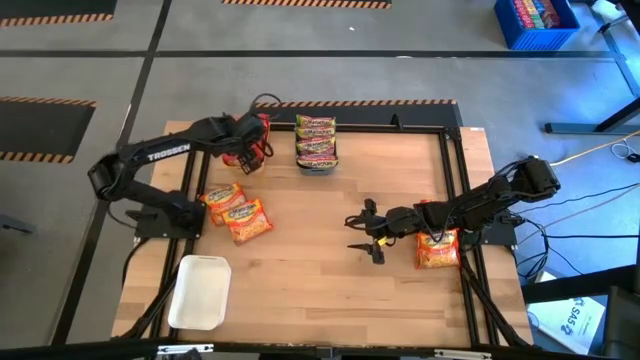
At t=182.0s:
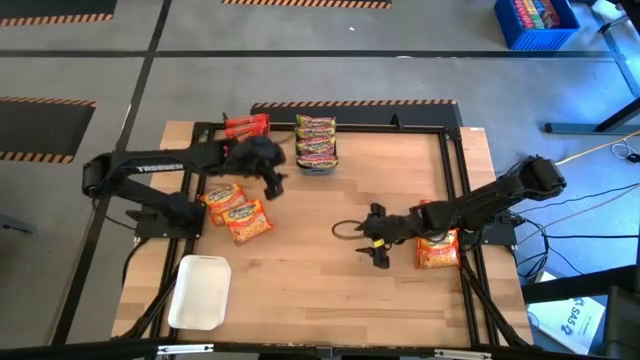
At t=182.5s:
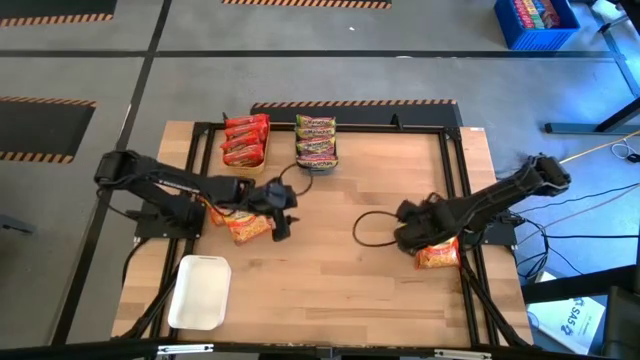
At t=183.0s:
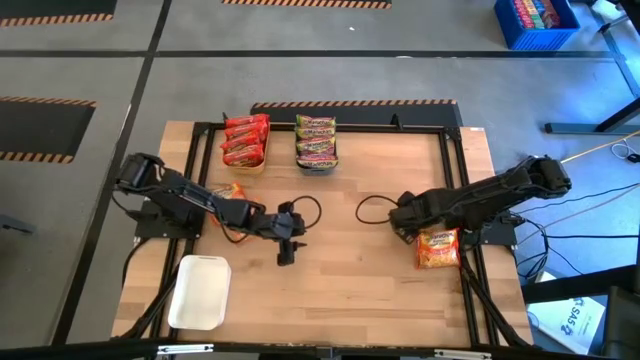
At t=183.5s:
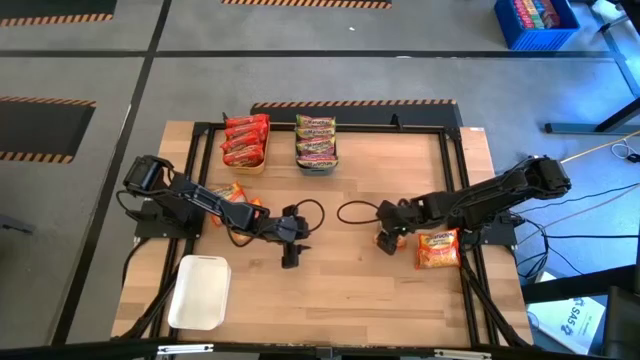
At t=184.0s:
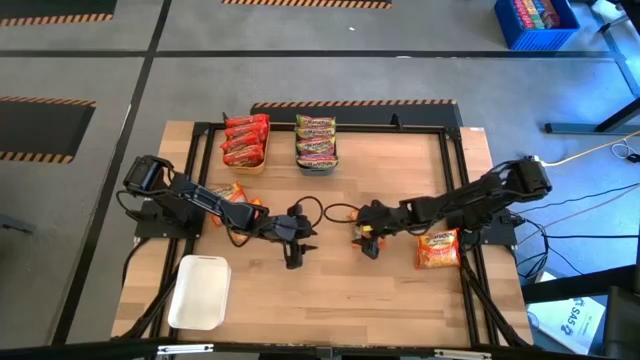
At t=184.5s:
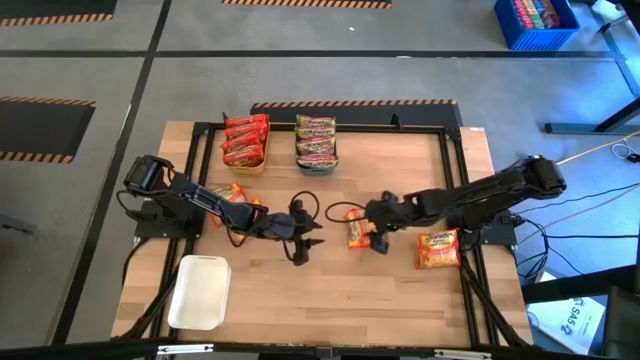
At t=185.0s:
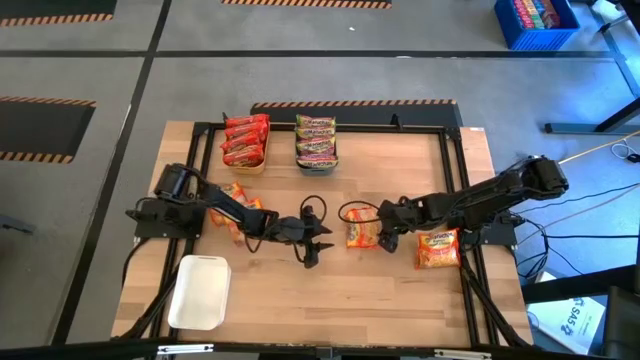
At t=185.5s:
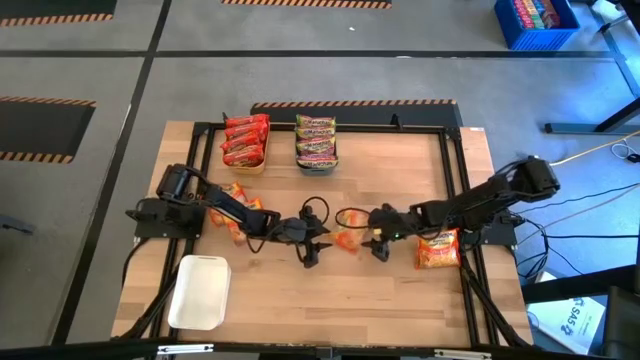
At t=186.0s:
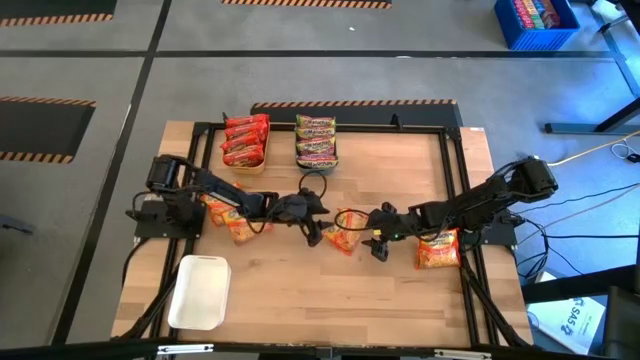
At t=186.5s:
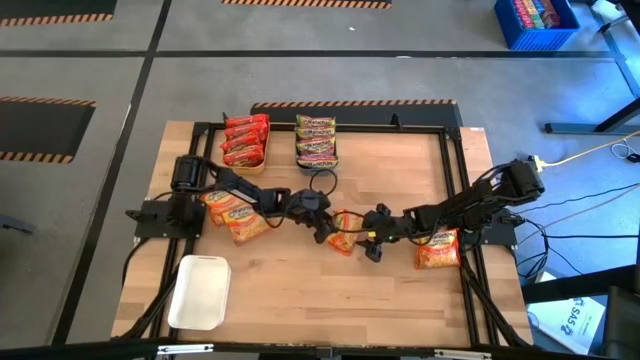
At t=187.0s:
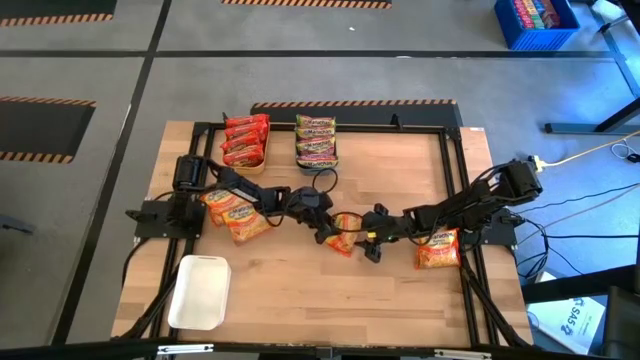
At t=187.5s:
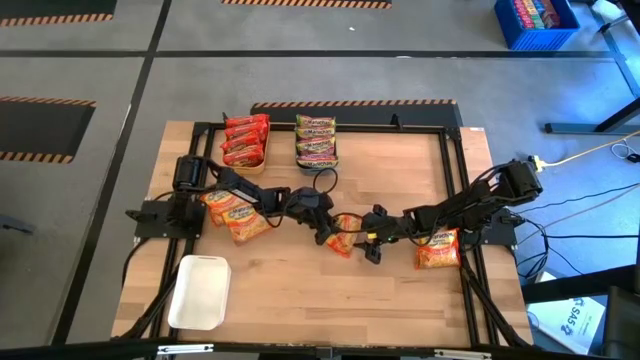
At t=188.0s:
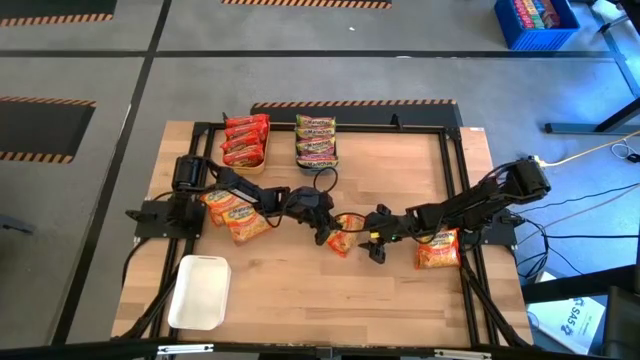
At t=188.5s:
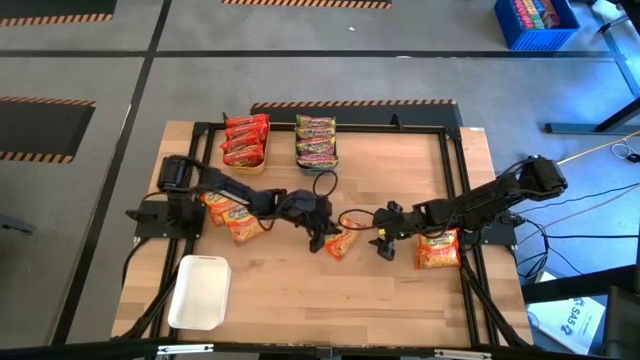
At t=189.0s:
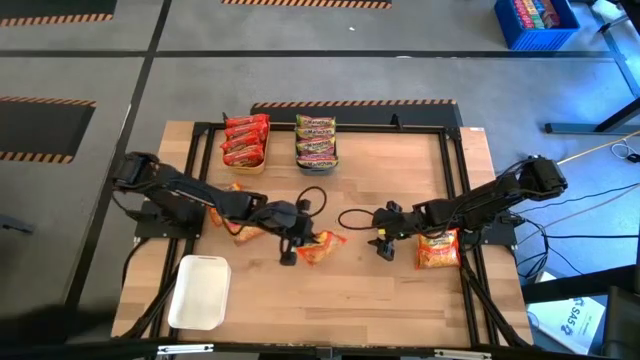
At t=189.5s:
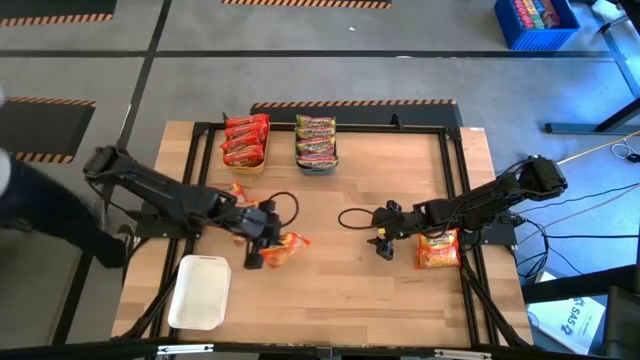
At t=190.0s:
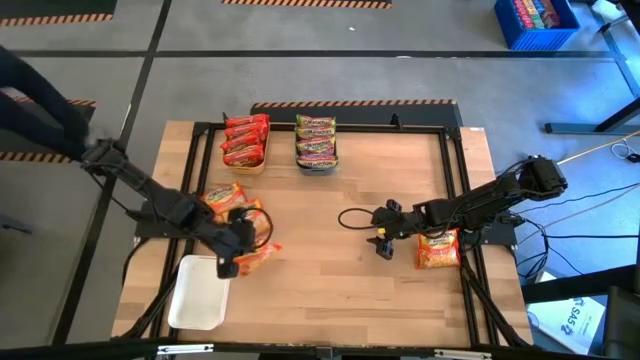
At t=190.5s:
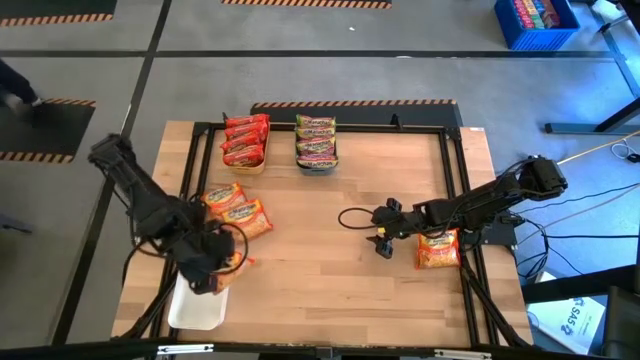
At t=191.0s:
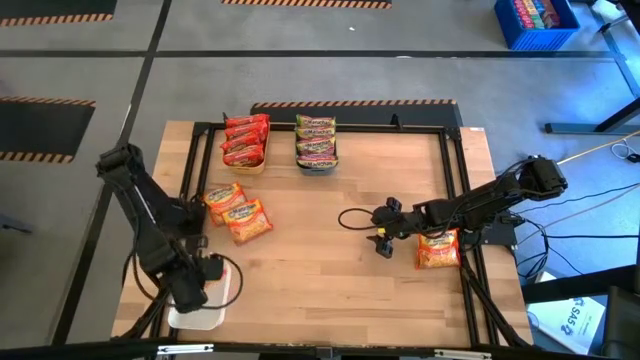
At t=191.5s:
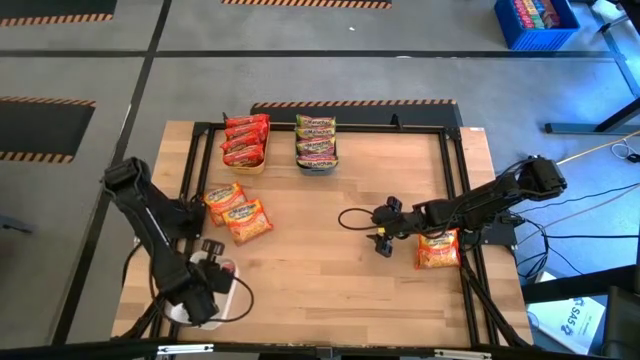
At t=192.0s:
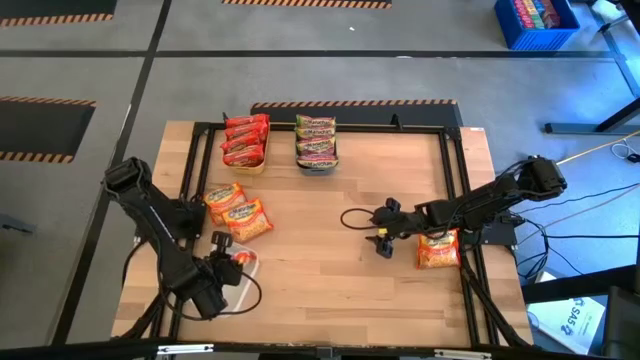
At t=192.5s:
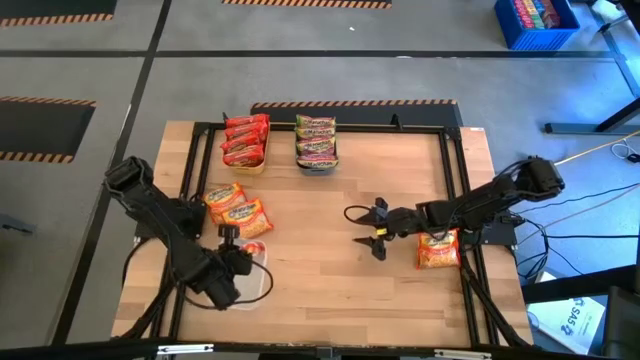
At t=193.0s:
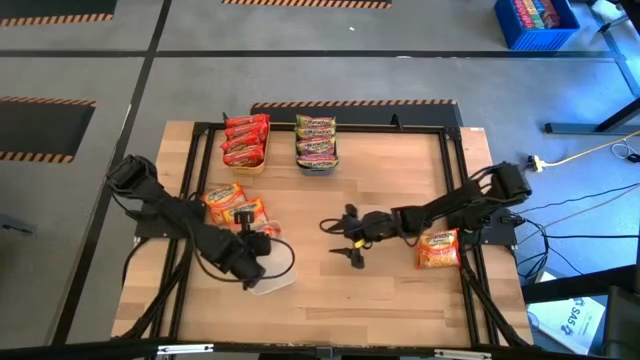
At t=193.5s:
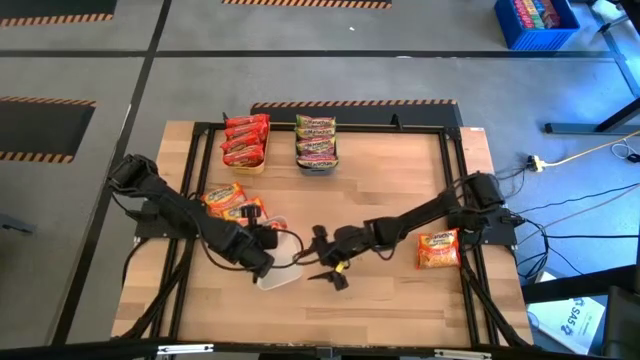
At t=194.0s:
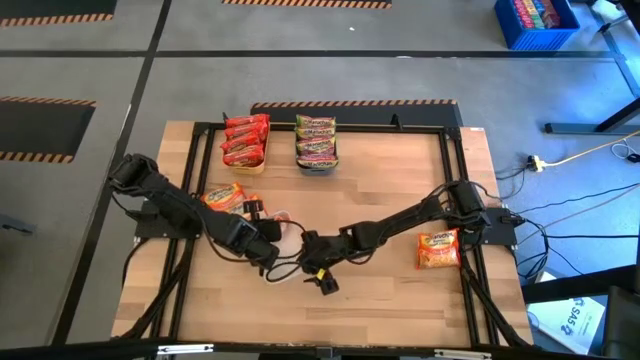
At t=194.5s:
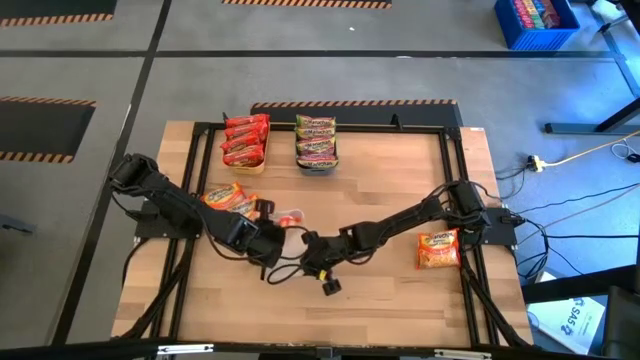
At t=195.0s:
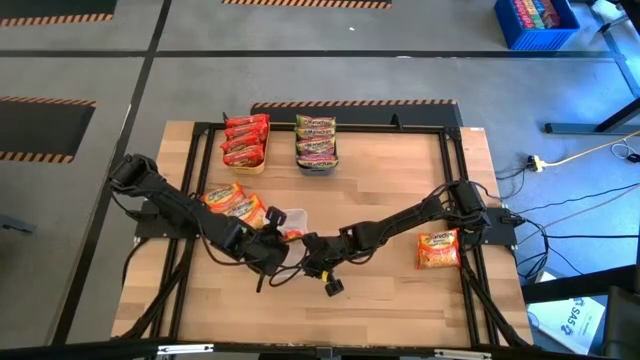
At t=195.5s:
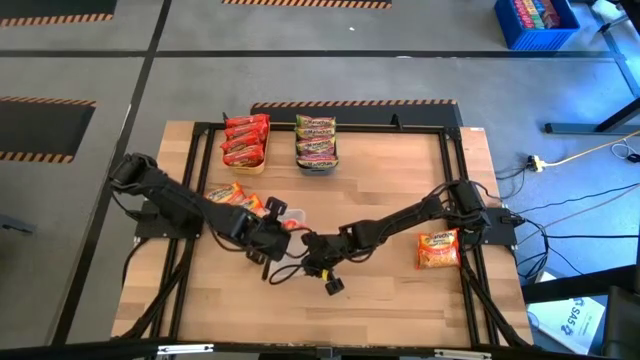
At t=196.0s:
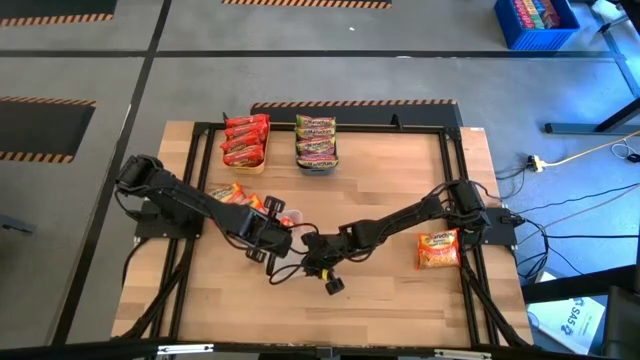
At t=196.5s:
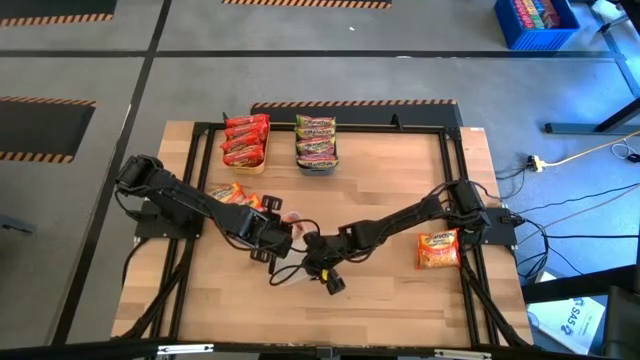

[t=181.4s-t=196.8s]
Task: Sort Maruchan noodles
Put the yellow noodle pack into the white bin

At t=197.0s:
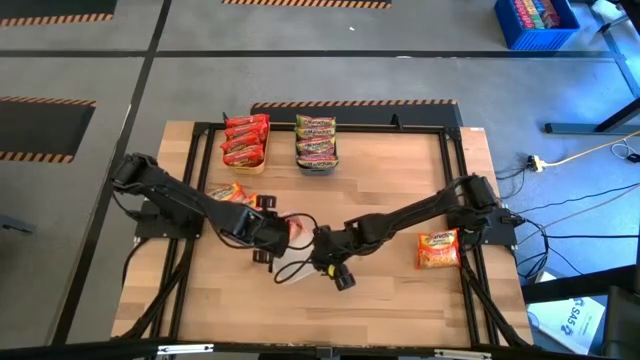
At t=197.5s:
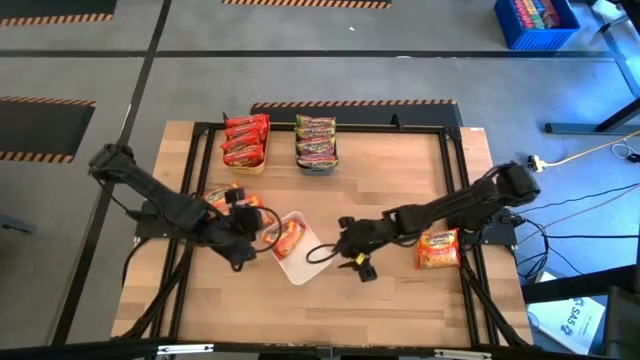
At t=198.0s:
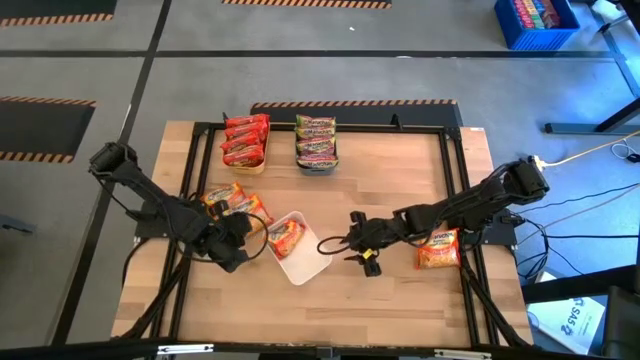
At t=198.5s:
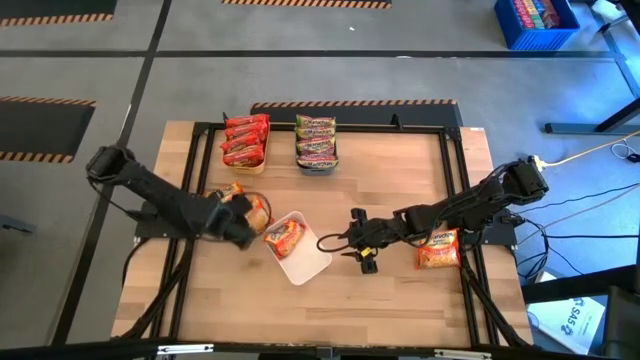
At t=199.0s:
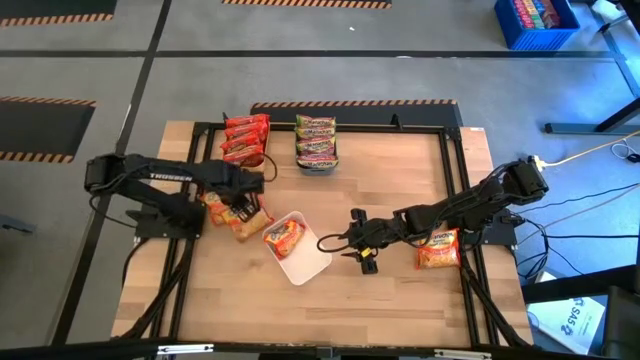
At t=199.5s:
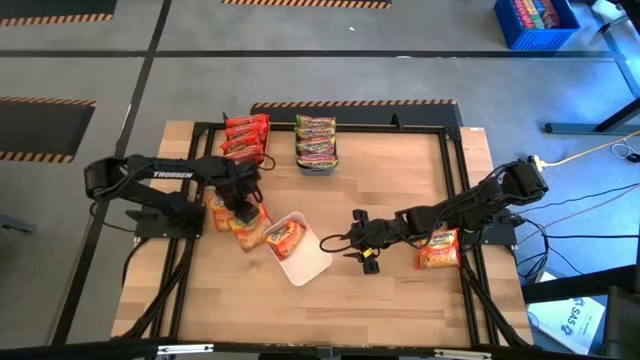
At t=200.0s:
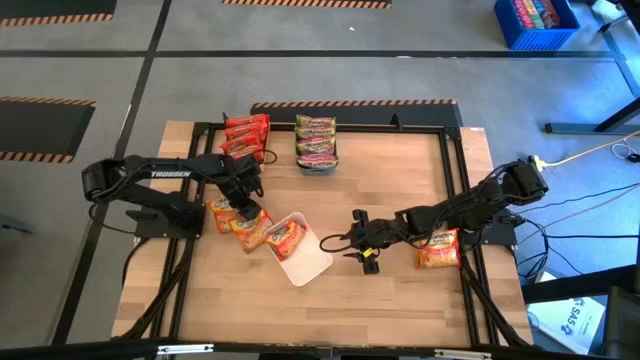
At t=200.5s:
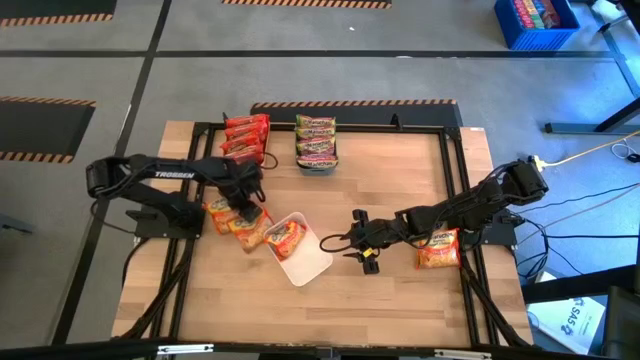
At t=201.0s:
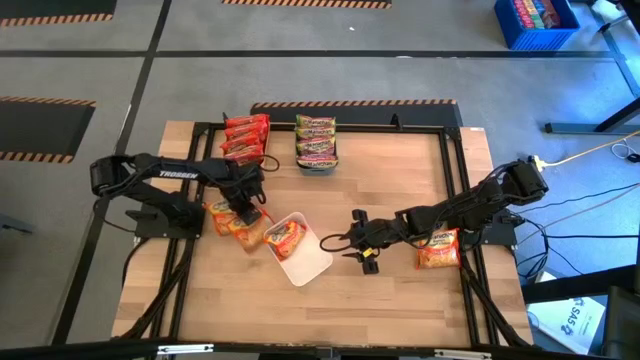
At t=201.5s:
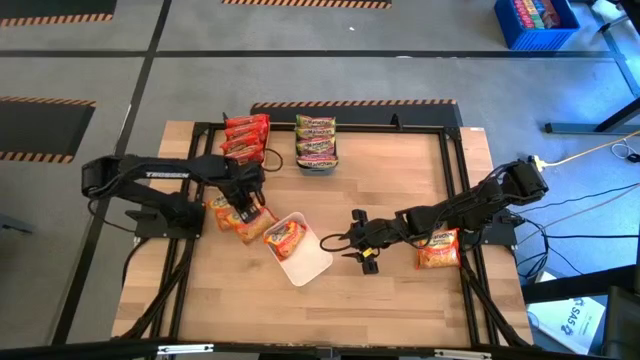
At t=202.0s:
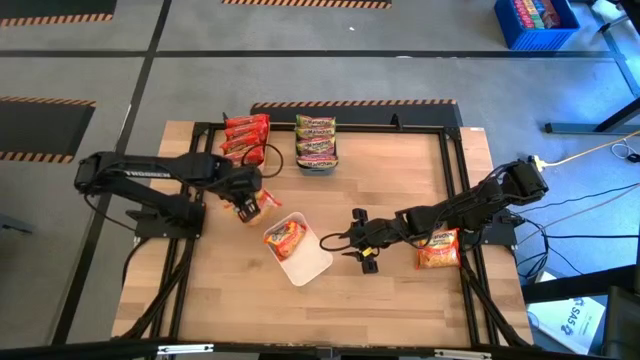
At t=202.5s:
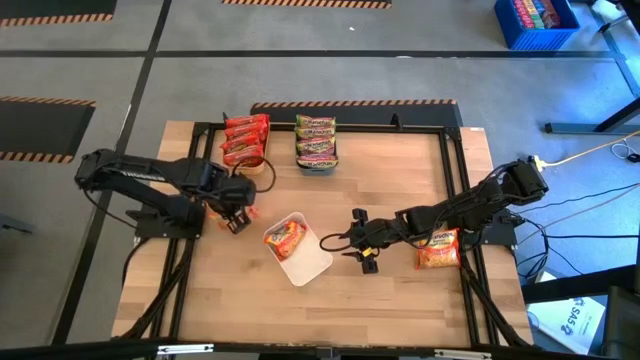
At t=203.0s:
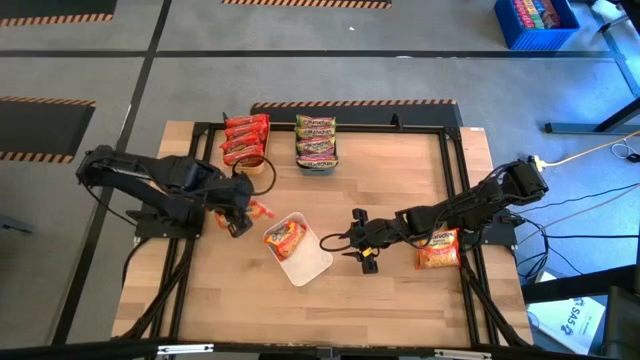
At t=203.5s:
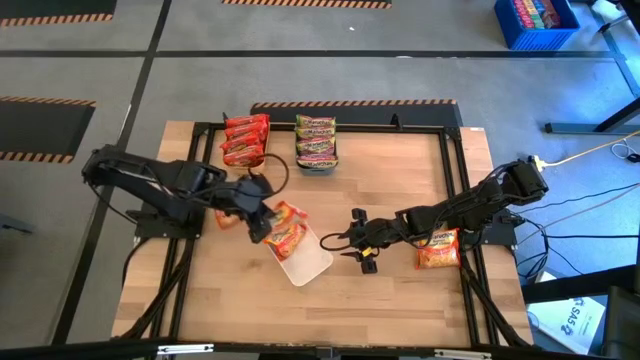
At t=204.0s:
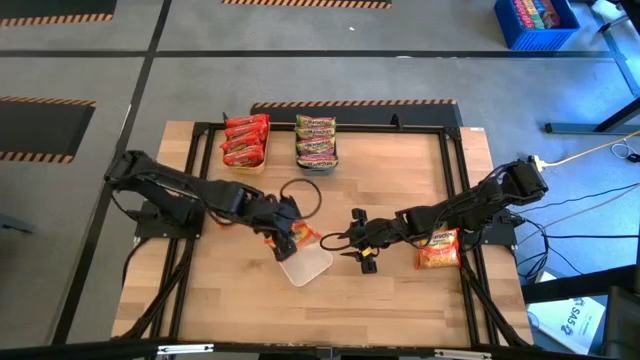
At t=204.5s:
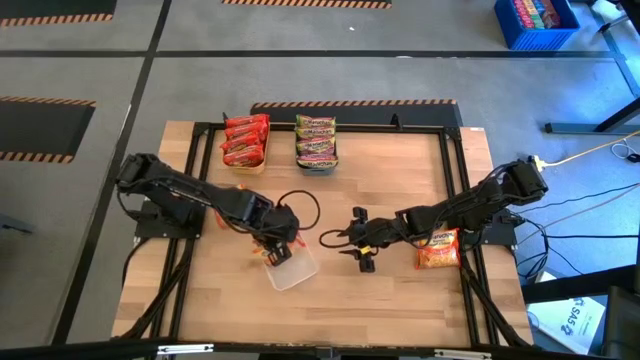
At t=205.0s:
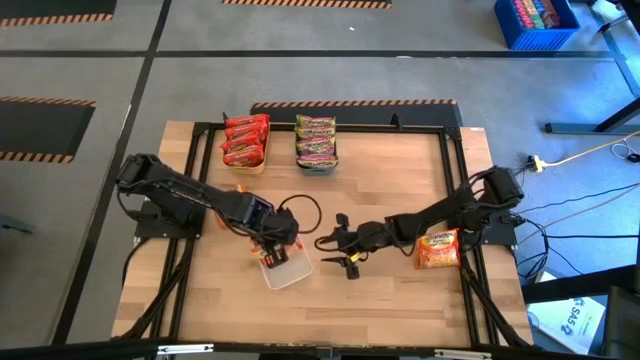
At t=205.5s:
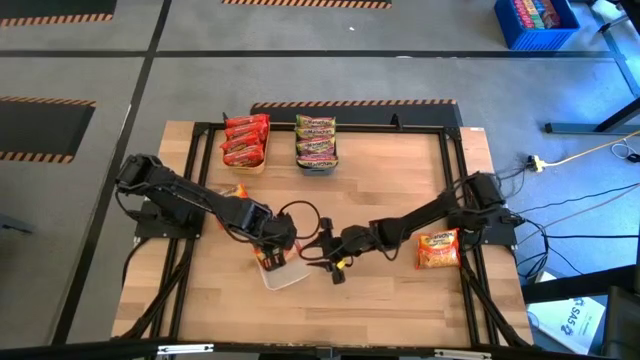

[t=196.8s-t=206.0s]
Put the yellow noodle pack into the white bin
